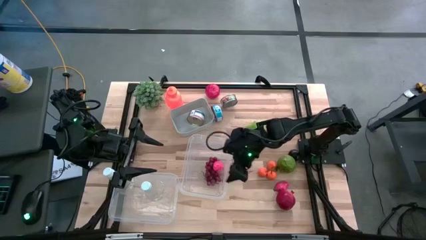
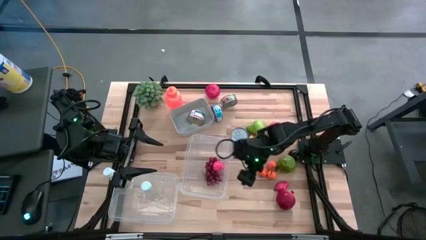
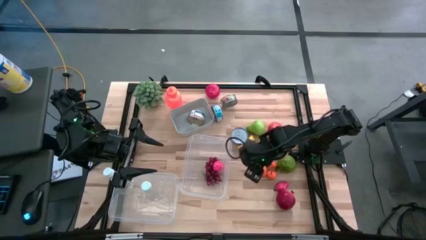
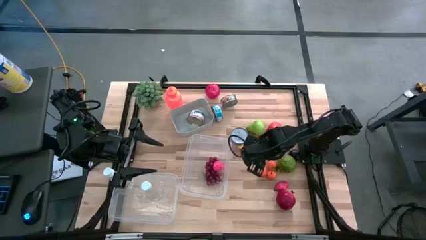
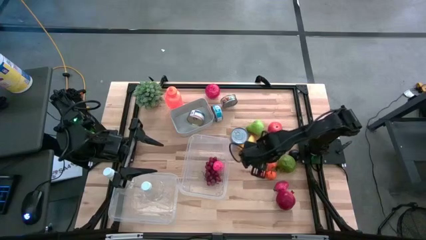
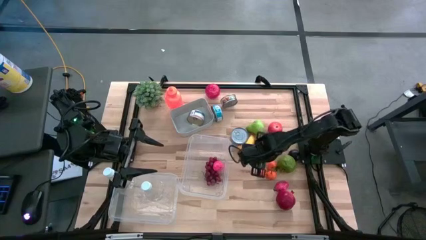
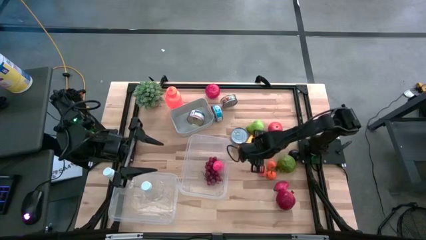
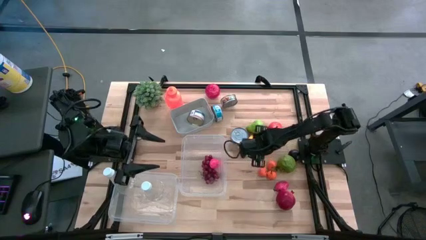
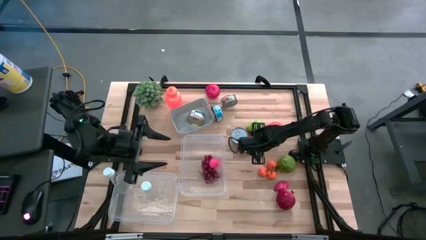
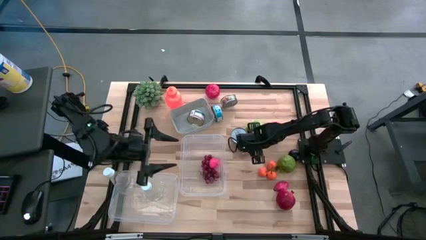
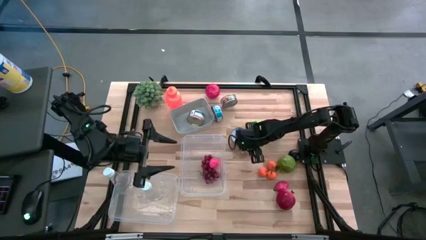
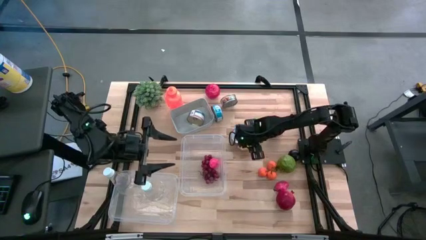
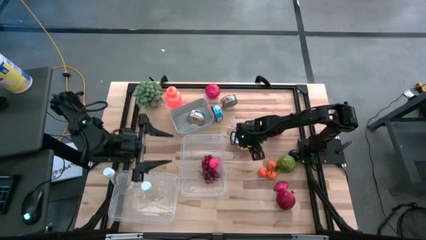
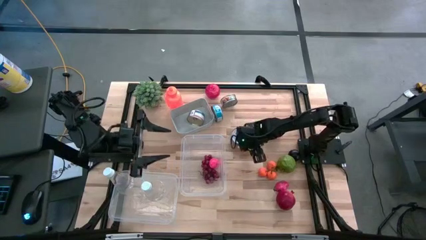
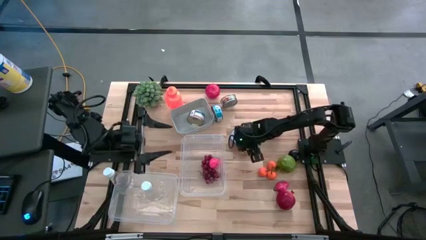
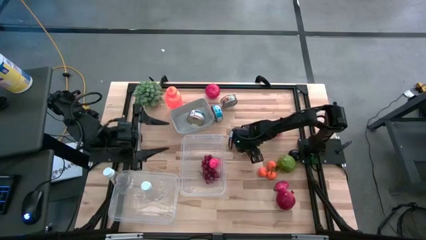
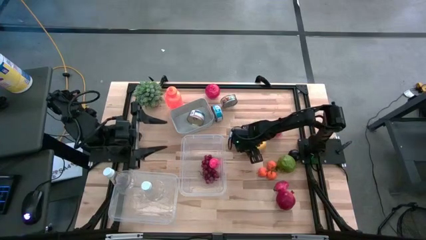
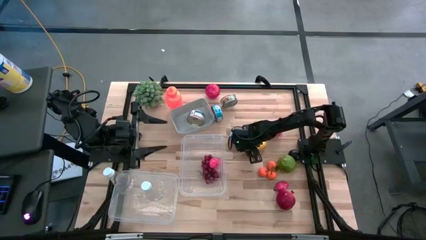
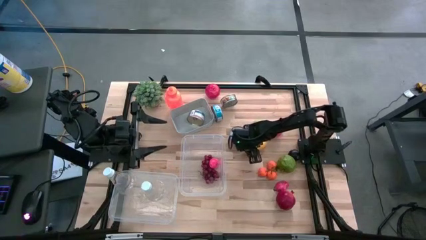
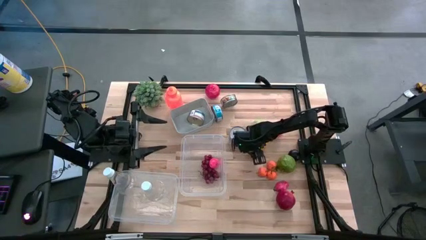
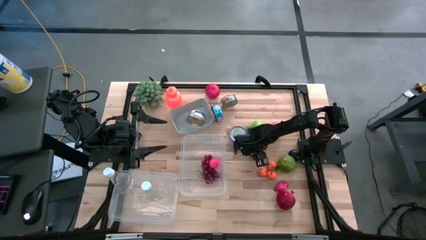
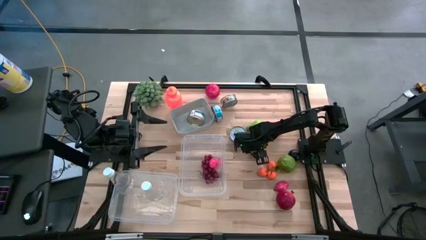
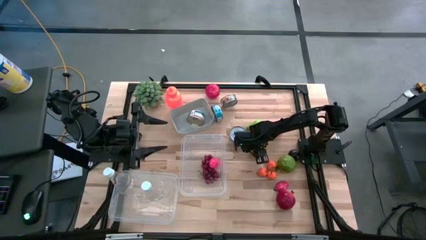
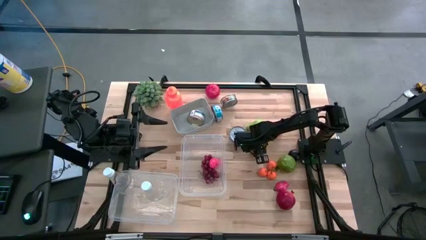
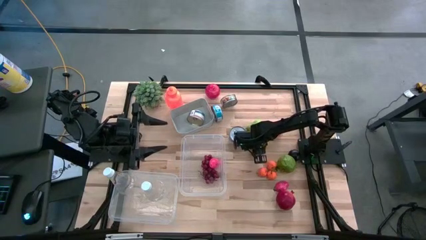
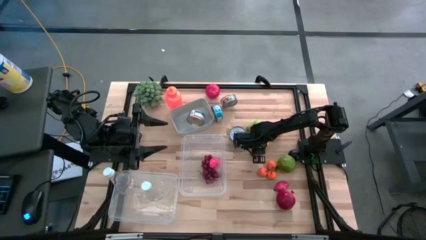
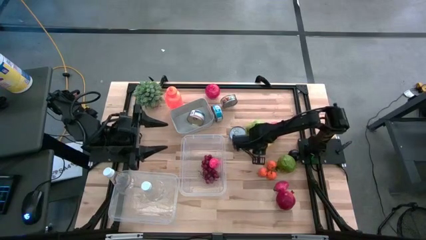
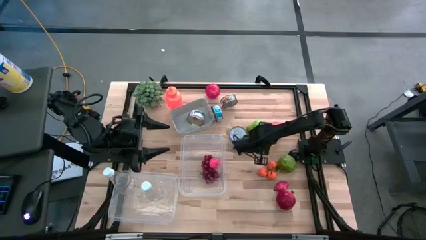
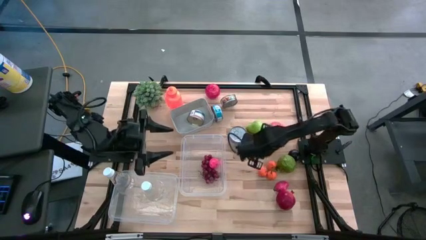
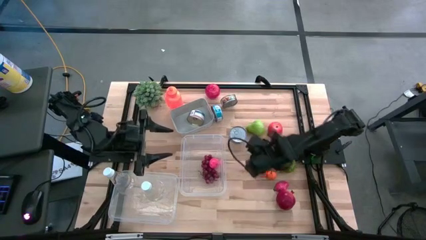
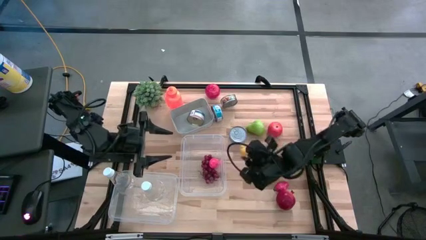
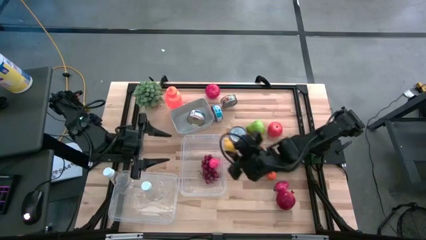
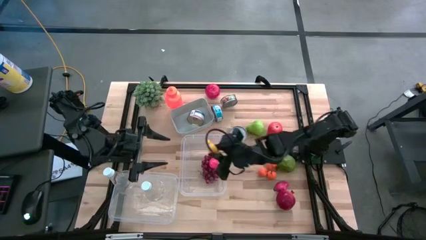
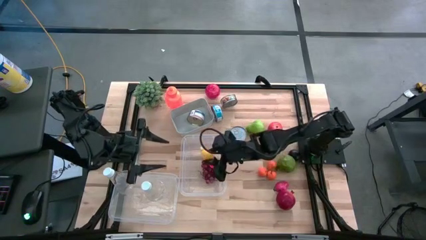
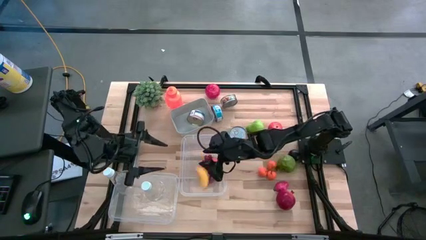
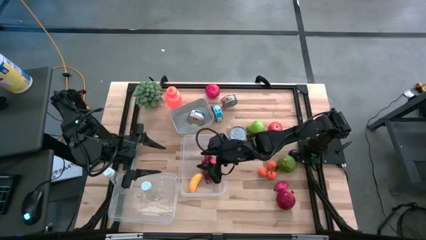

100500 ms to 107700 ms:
Task: Pick & Place Food Item
Put the banana into the right transparent bin

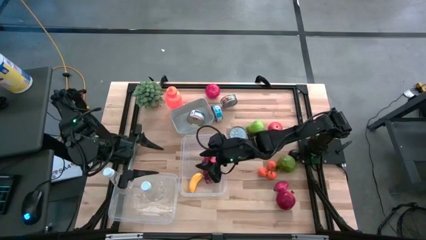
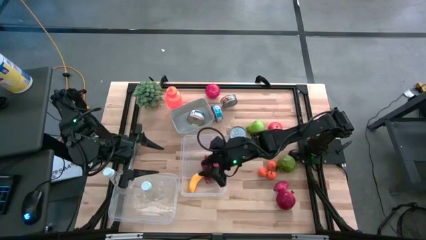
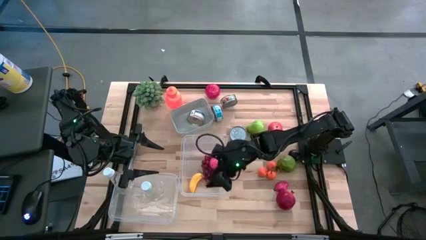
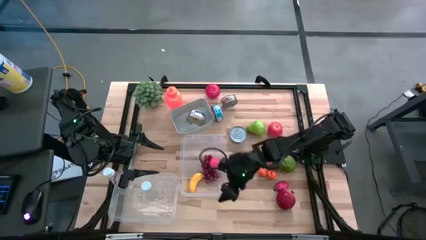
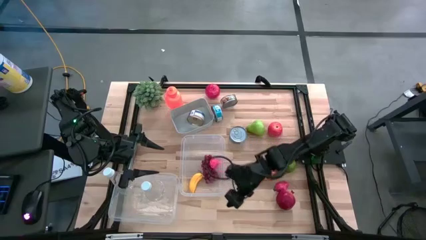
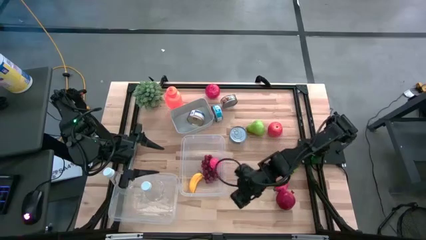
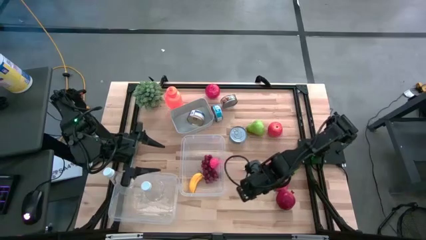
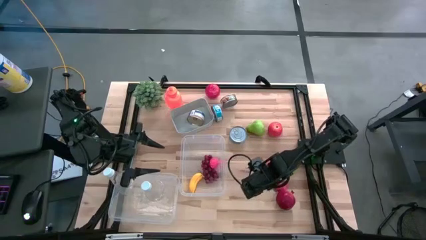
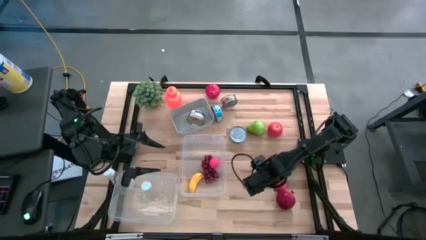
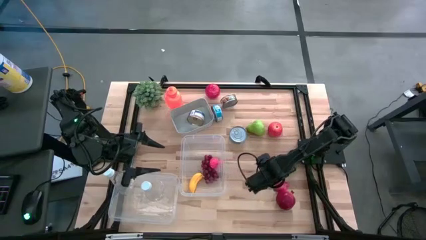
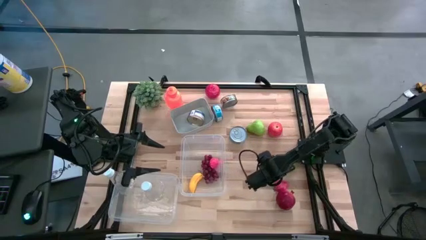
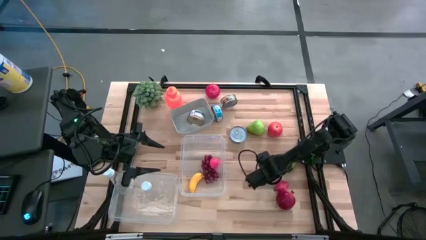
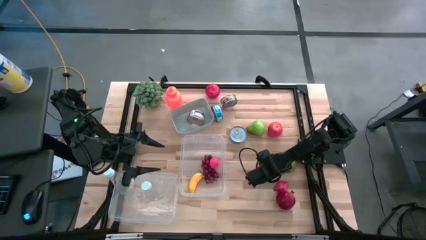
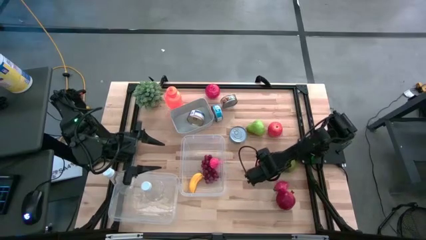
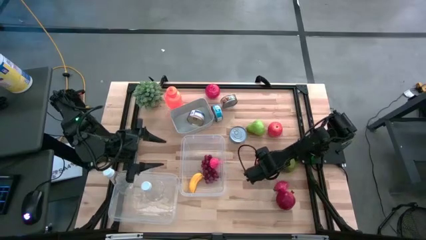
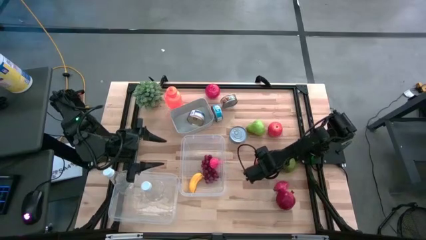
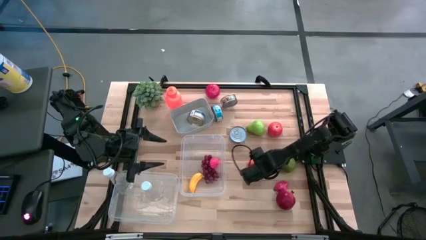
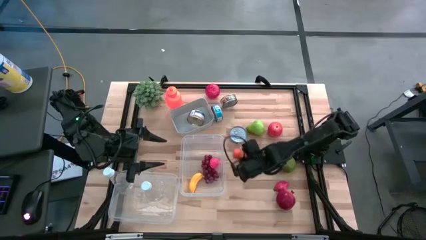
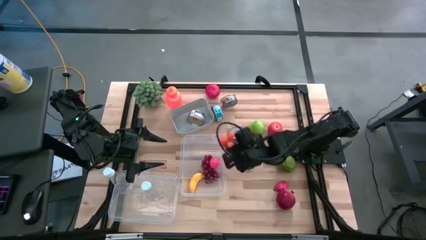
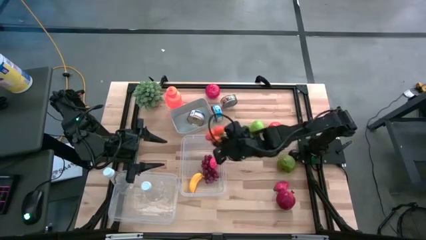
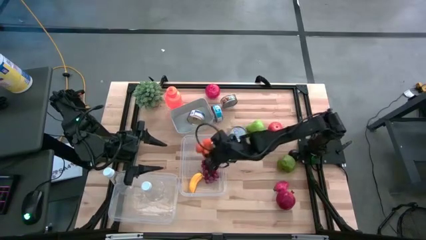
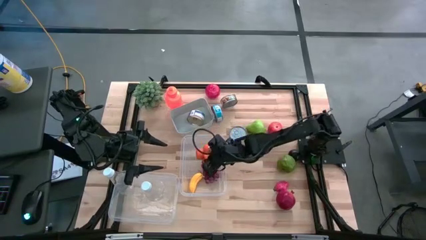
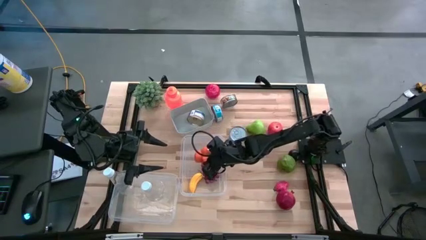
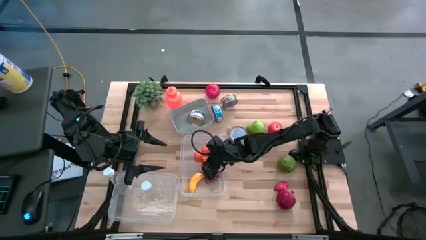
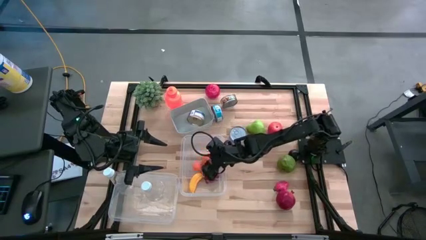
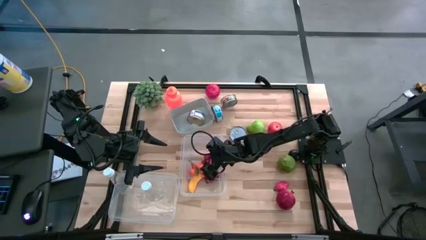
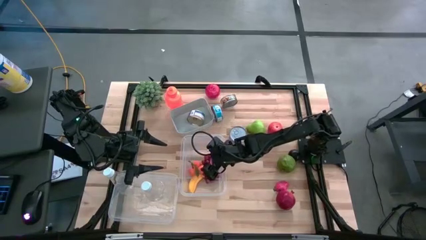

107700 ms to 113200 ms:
Put the bunch of oranges into the right transparent bin

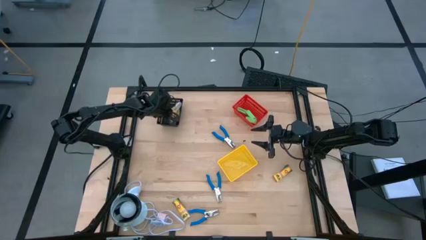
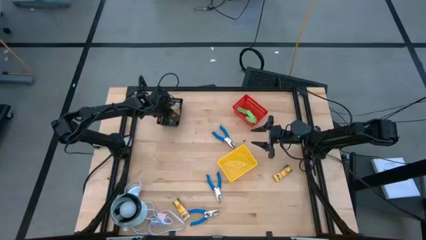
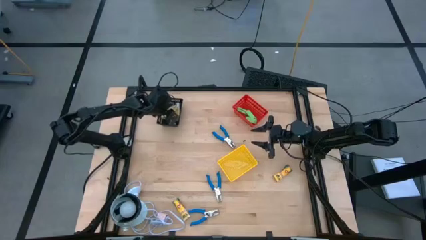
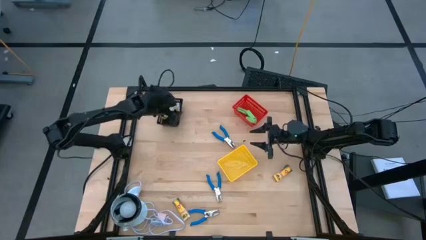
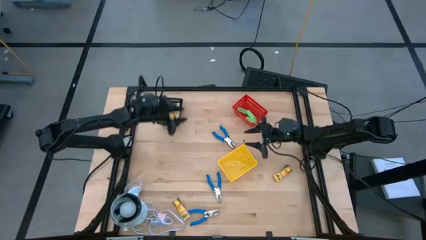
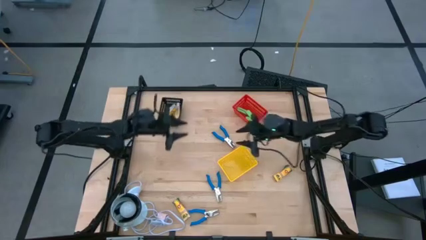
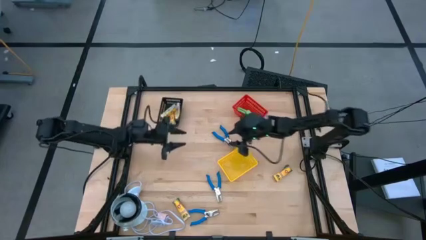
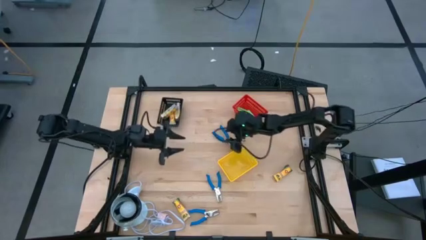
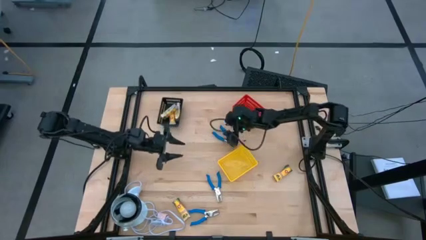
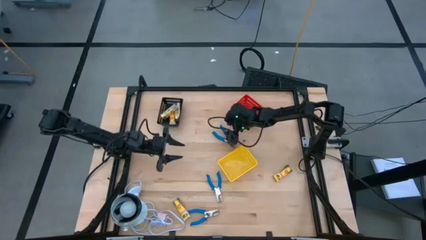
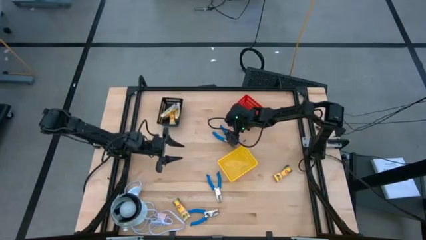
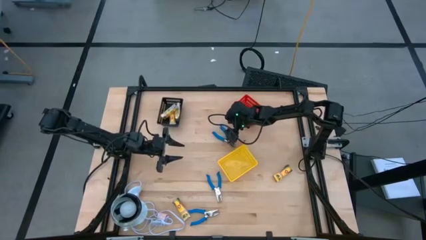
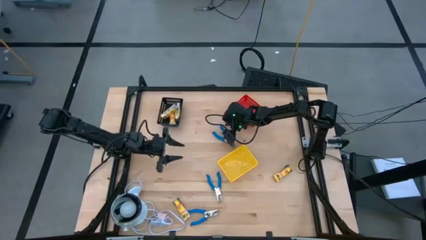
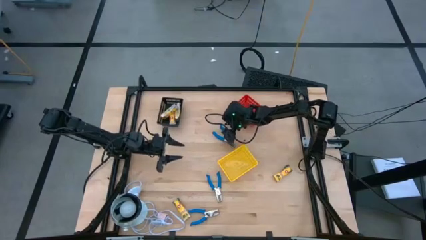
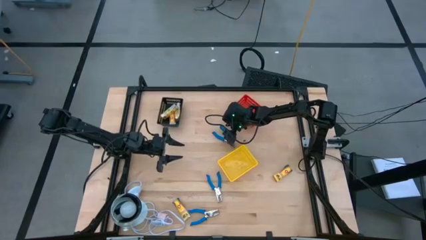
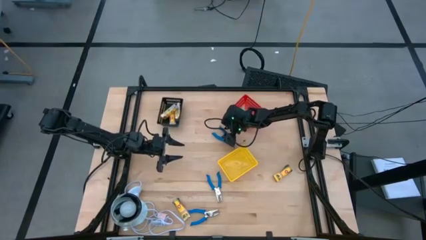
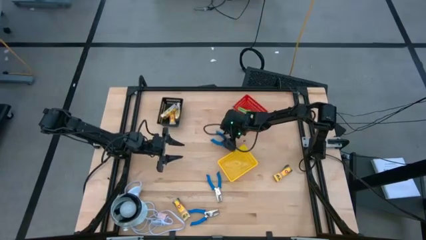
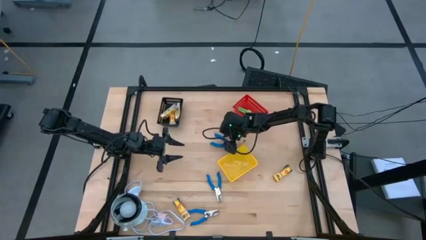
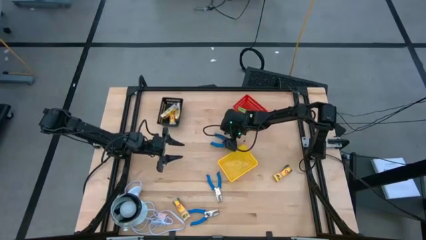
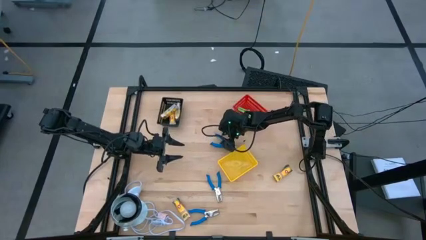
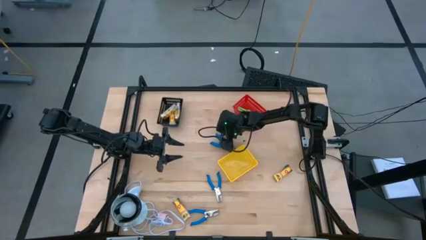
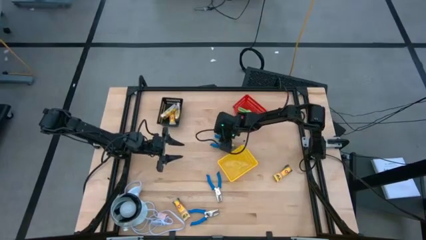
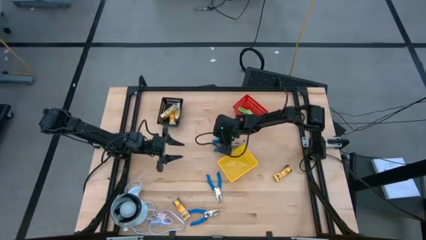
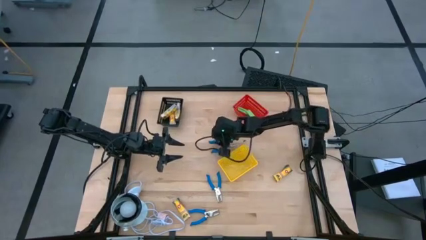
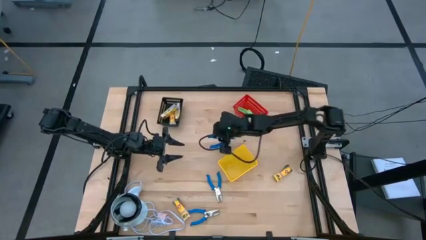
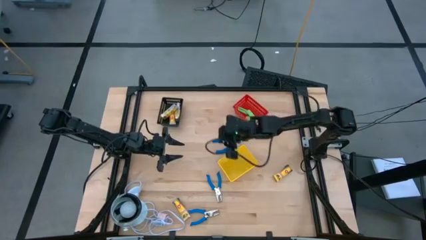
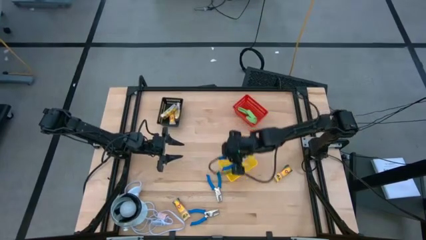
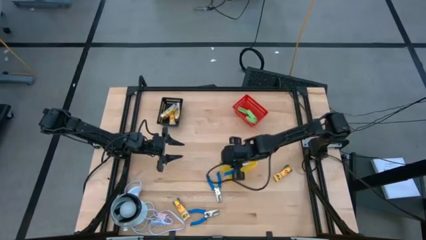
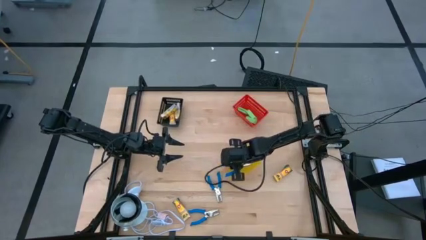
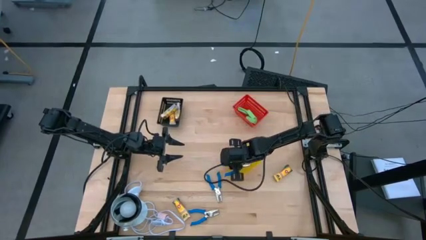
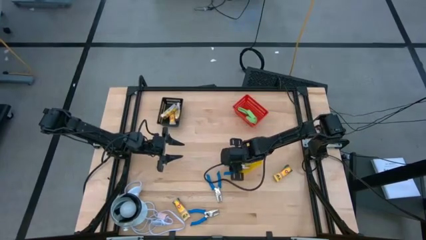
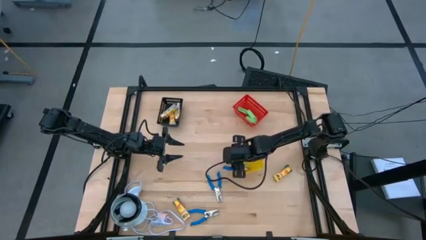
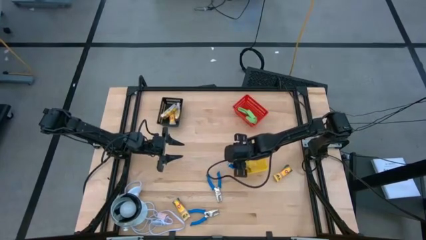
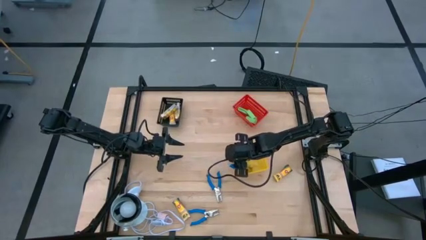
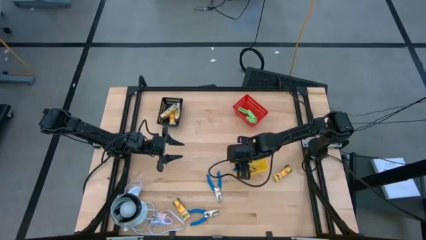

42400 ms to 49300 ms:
Task: Pick & Place School Supplies
Put the blue punch plier into the yellow bin
